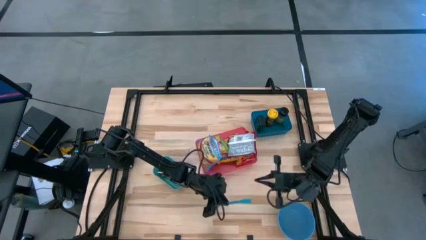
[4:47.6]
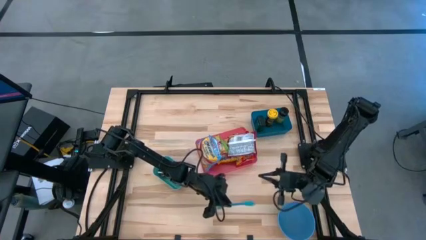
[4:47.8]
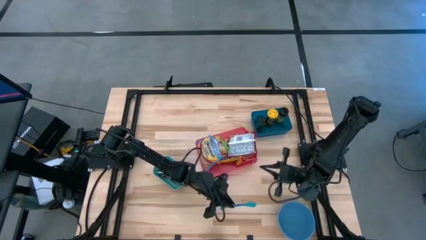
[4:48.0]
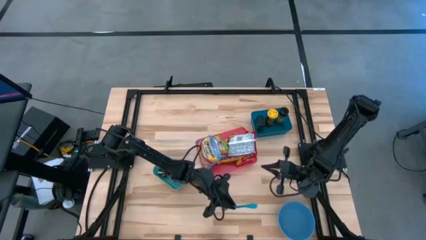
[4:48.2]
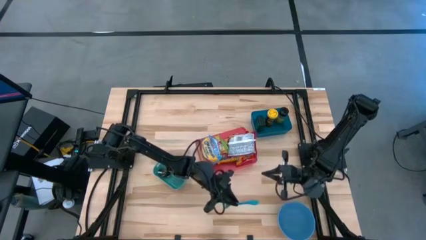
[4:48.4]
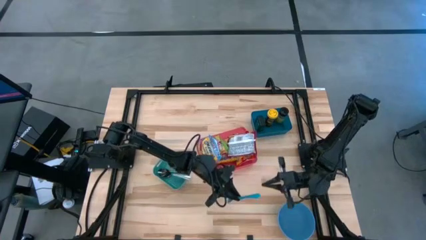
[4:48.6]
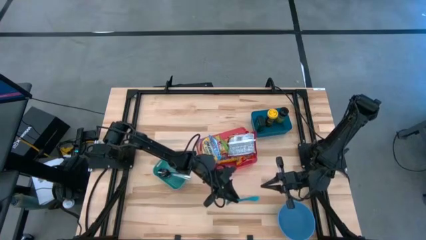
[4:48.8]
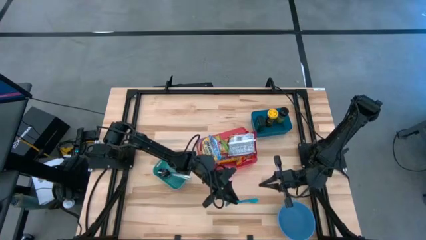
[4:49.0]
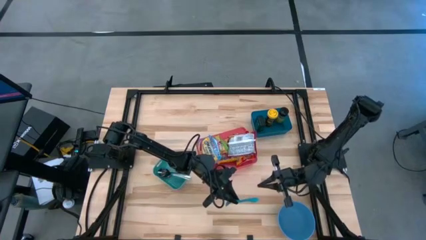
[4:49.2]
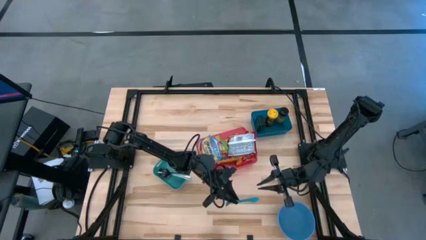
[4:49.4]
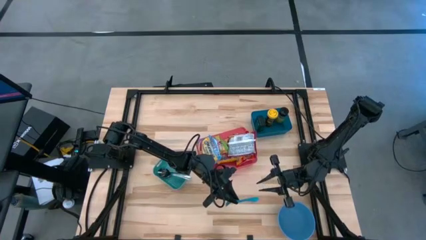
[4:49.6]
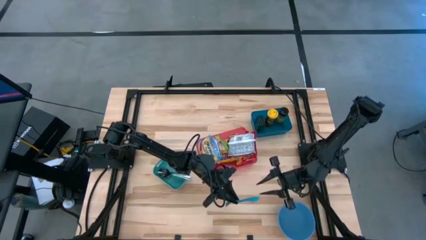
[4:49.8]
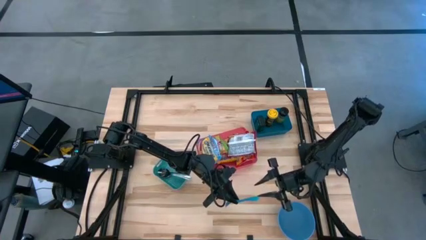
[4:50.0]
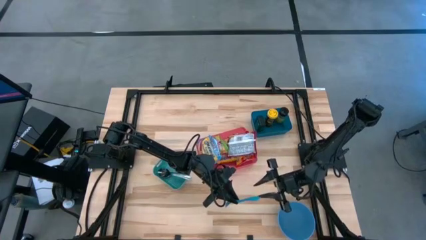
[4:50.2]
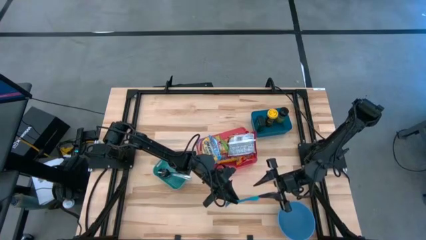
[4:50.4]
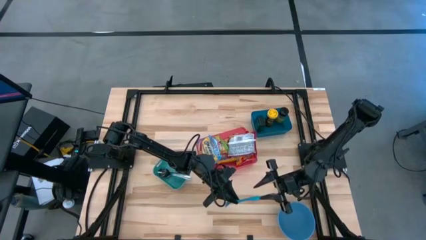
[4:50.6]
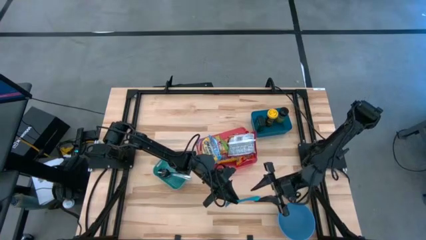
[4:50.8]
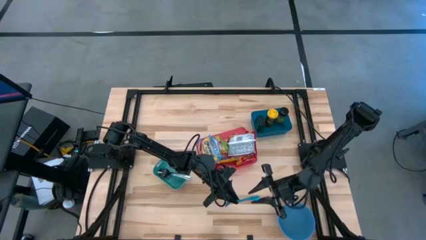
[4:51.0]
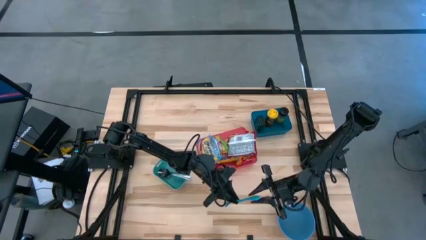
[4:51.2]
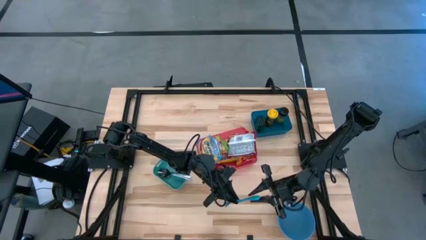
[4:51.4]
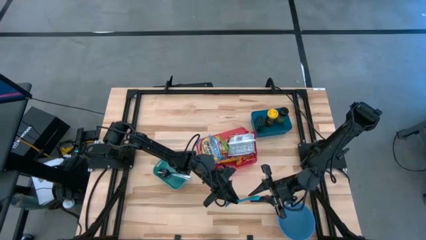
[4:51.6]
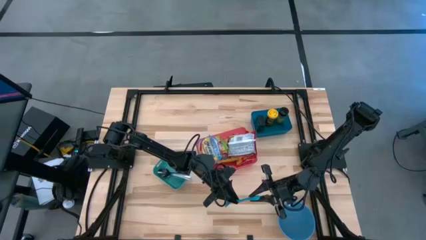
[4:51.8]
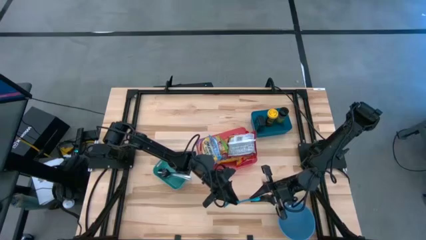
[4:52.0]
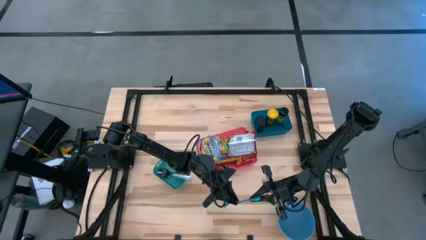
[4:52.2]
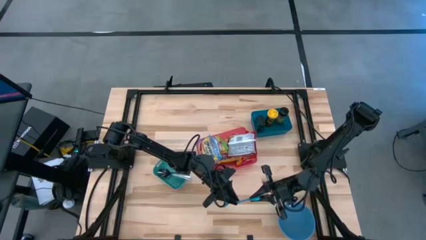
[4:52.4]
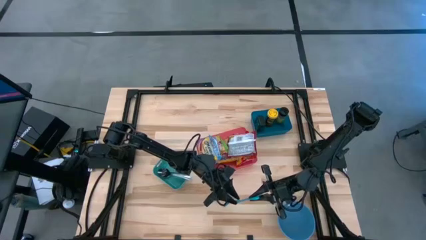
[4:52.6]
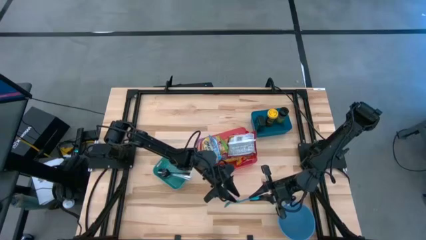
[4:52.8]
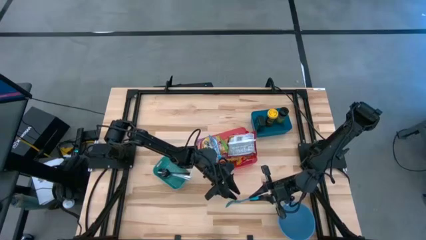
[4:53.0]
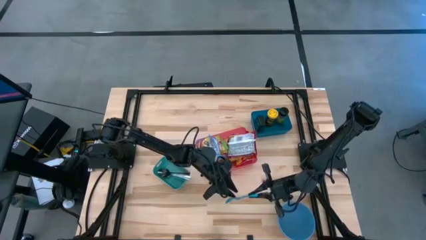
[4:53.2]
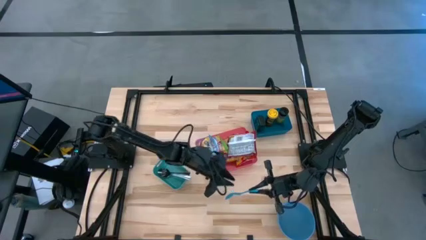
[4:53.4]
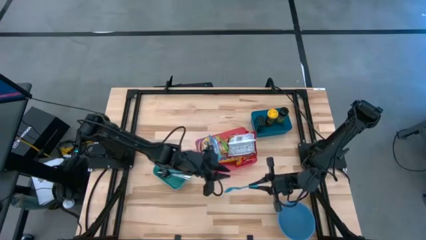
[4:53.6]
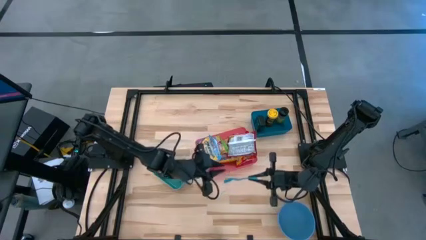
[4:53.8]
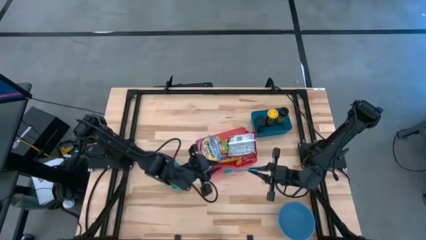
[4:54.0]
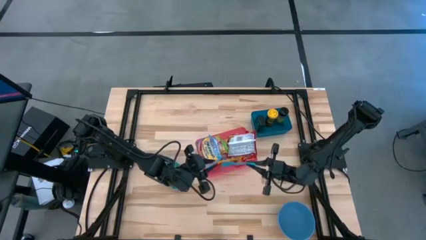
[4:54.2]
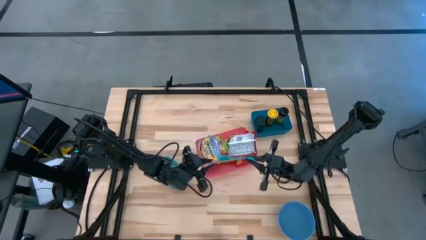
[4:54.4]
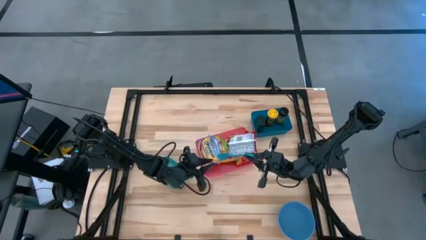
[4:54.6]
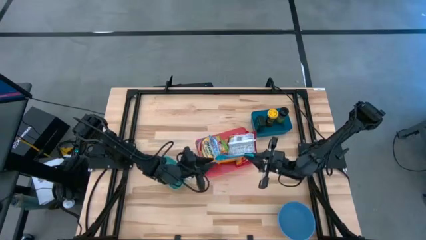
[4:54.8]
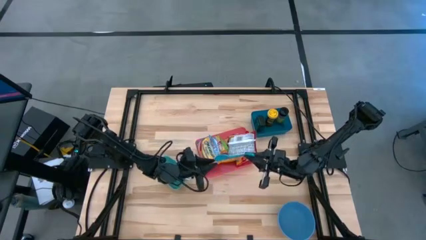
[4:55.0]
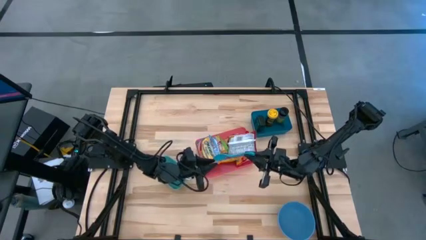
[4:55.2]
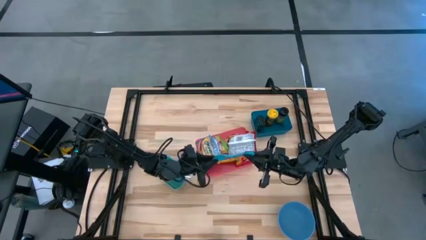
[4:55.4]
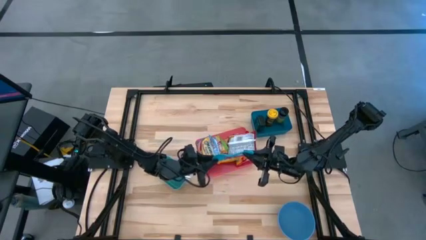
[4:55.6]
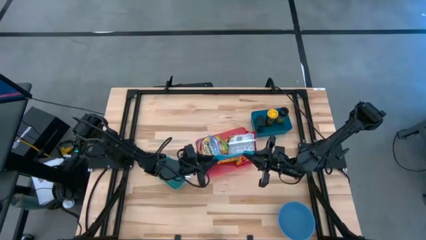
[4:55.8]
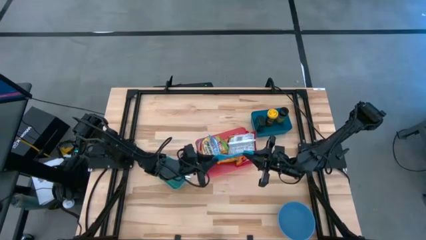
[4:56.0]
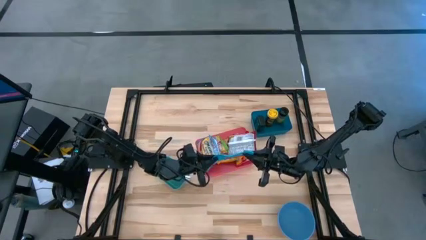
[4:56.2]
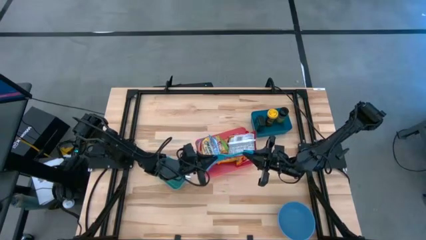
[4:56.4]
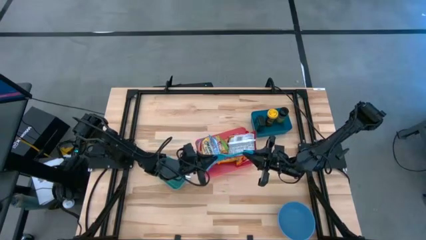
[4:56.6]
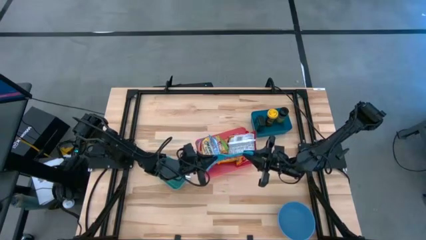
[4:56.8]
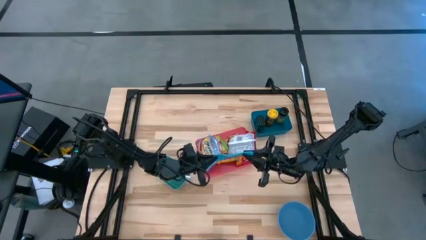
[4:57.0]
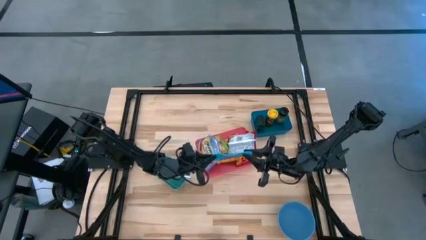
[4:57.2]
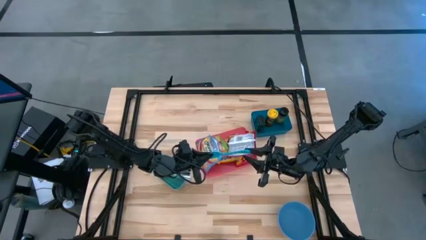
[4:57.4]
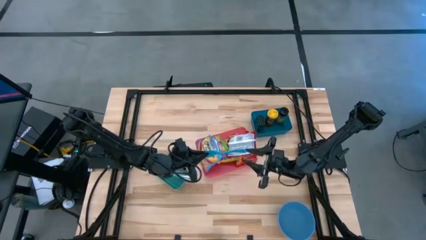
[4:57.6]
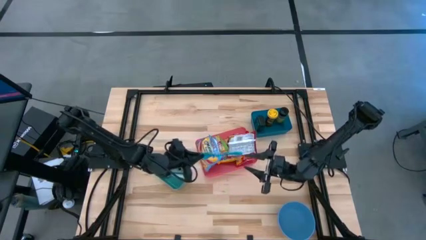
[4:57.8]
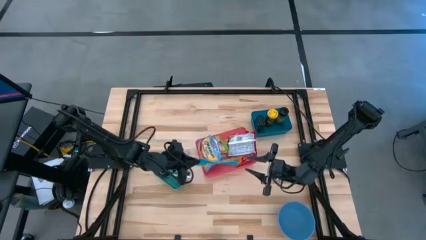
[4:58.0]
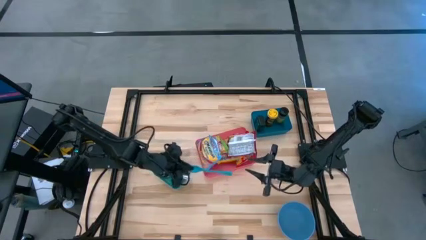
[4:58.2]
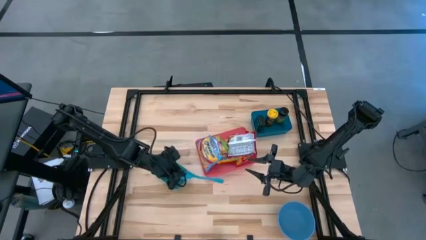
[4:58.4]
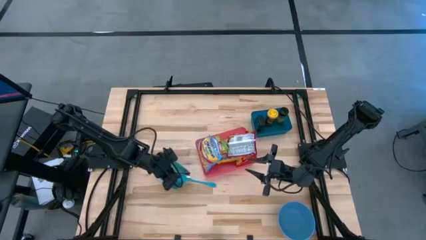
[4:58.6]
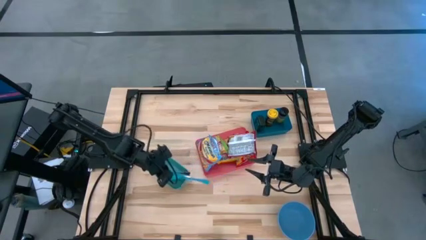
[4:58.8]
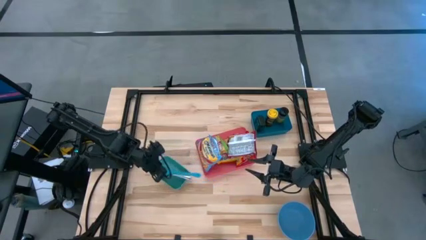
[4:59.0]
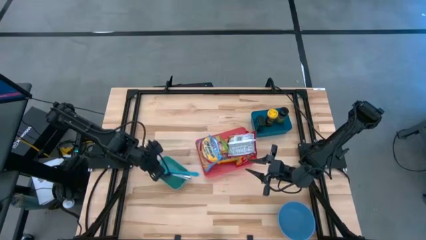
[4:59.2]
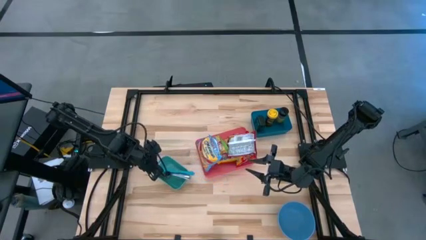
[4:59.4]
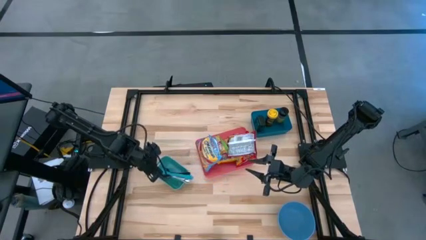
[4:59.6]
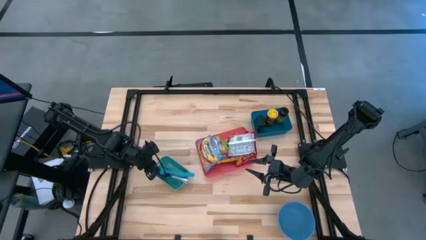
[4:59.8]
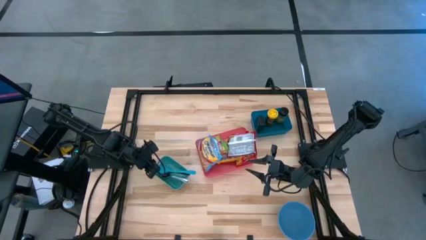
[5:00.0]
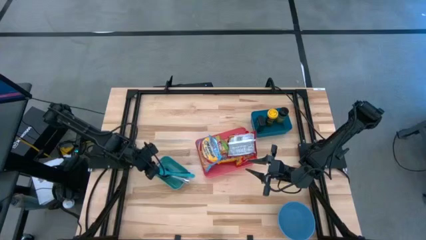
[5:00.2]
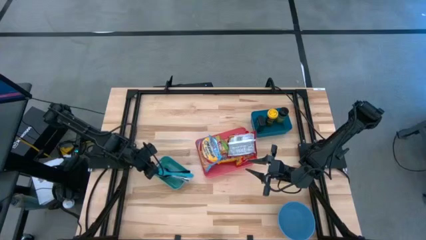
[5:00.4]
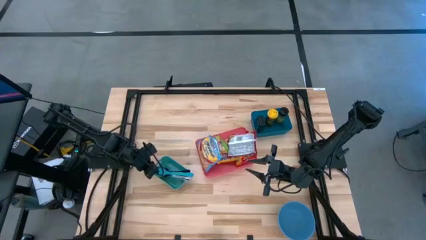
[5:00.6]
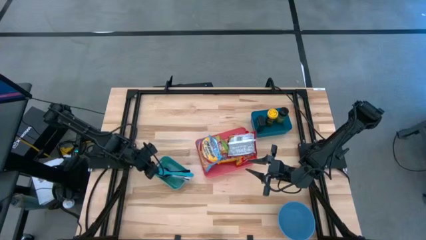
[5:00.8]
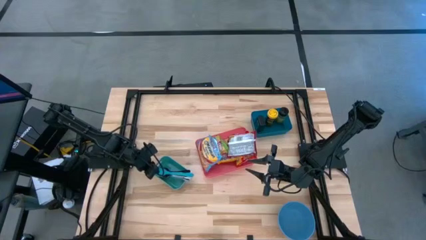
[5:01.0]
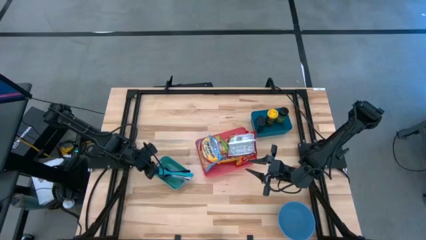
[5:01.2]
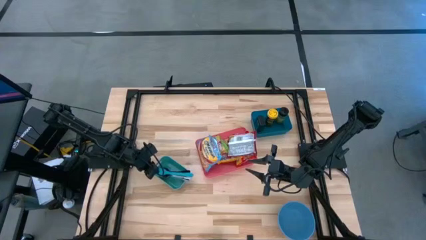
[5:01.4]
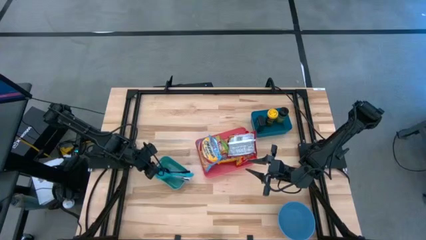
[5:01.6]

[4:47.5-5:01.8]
Task: Pick & Place Food Item
Put the blue baby spoon into the green bin
